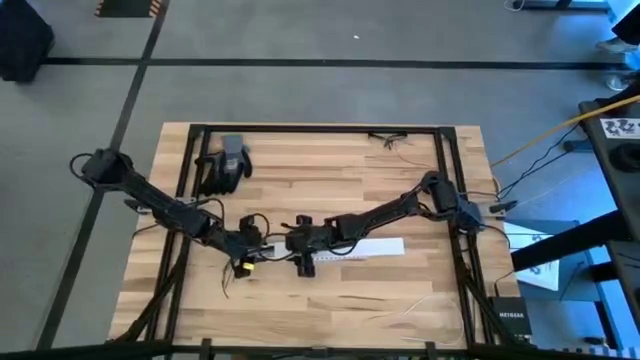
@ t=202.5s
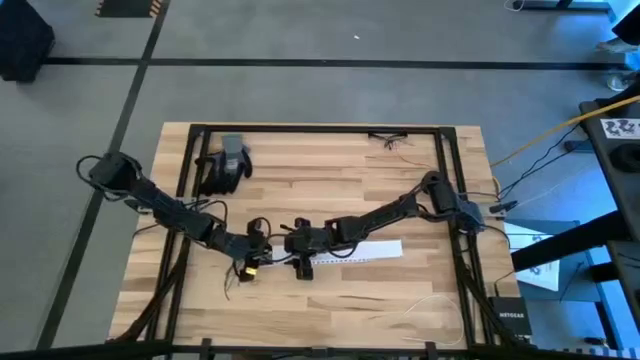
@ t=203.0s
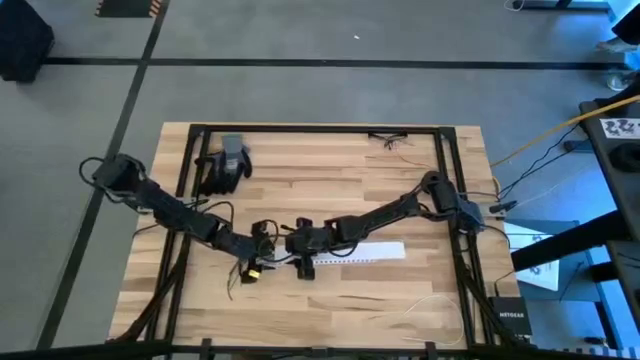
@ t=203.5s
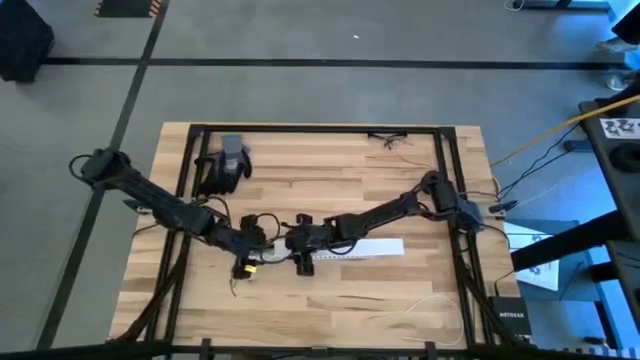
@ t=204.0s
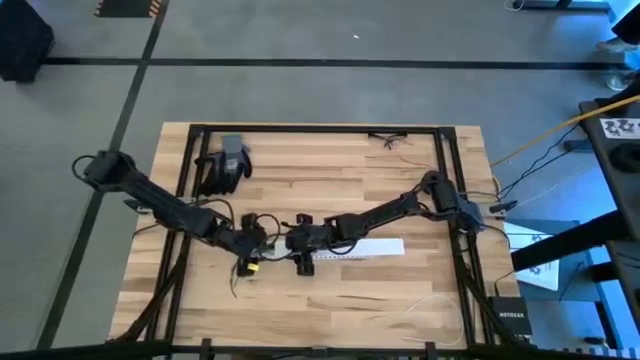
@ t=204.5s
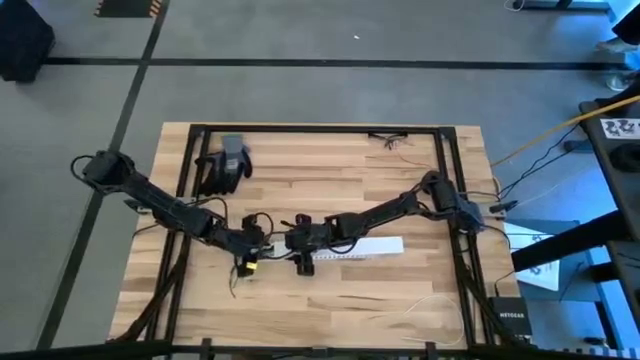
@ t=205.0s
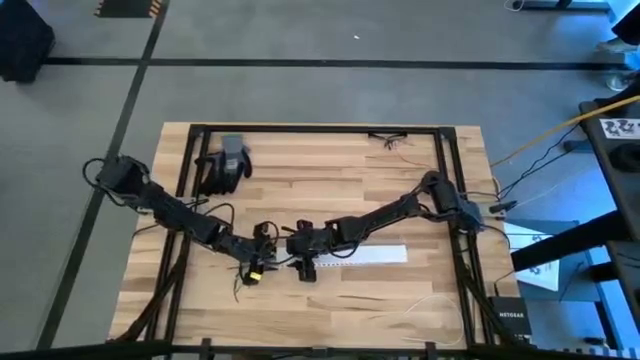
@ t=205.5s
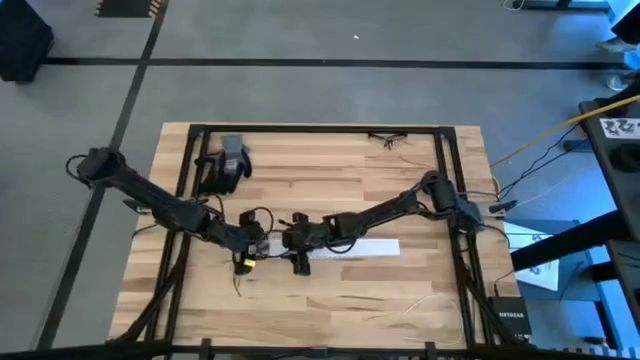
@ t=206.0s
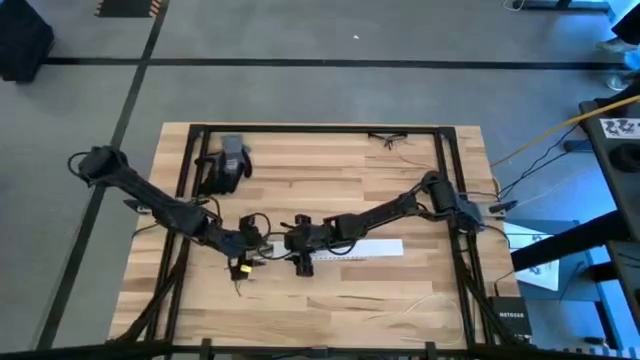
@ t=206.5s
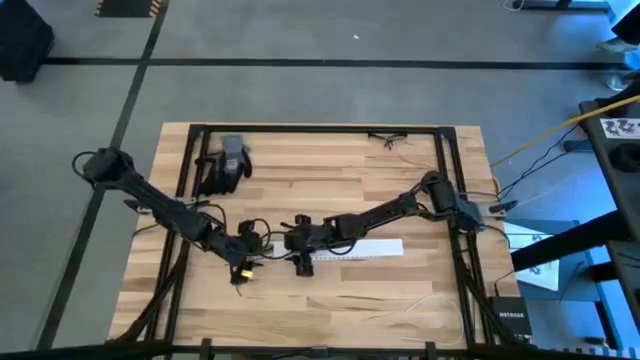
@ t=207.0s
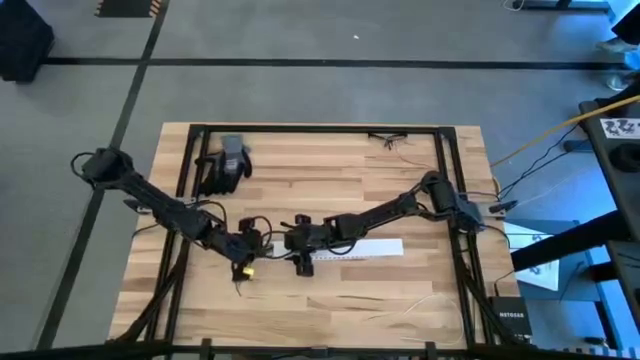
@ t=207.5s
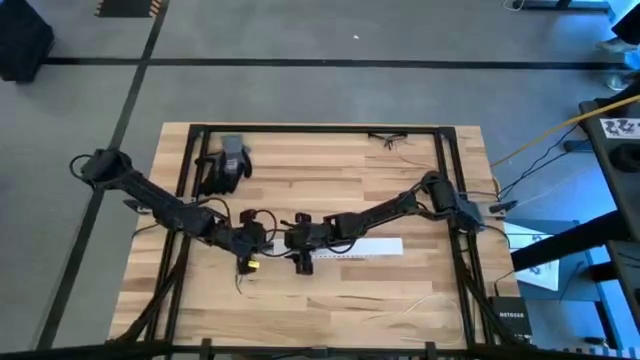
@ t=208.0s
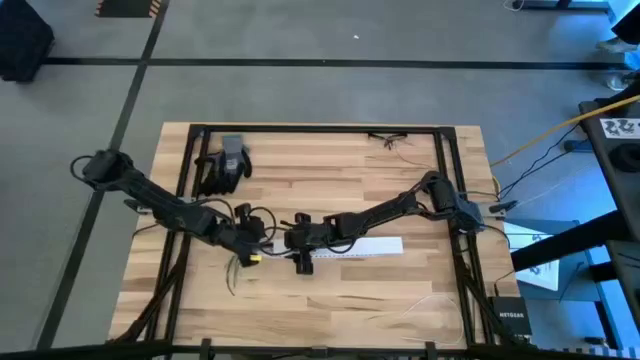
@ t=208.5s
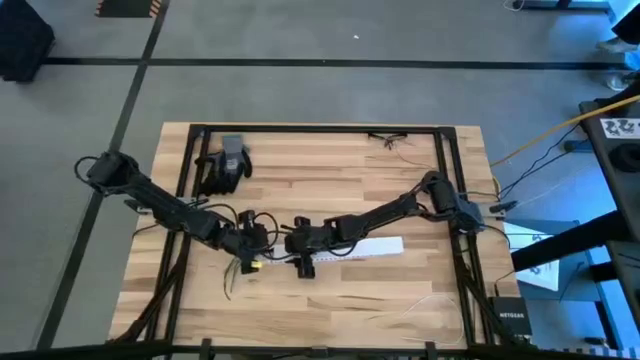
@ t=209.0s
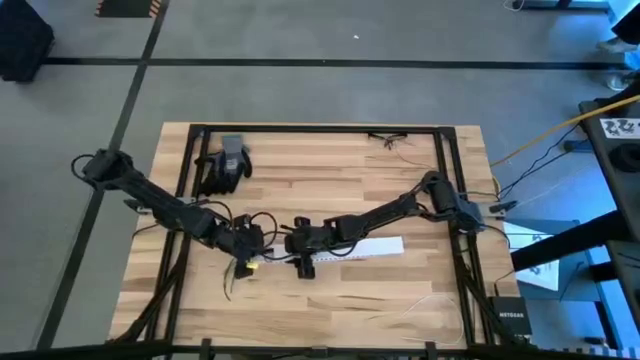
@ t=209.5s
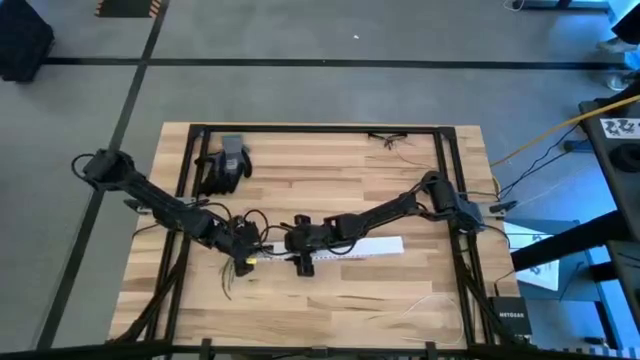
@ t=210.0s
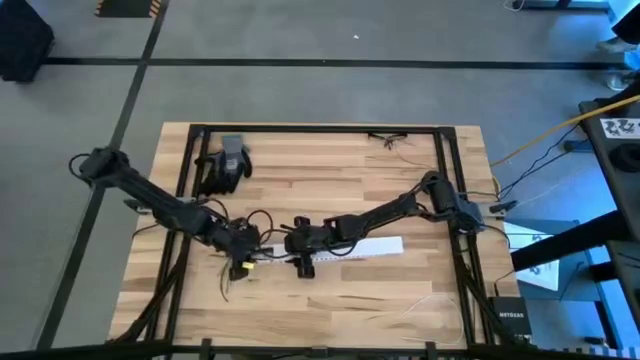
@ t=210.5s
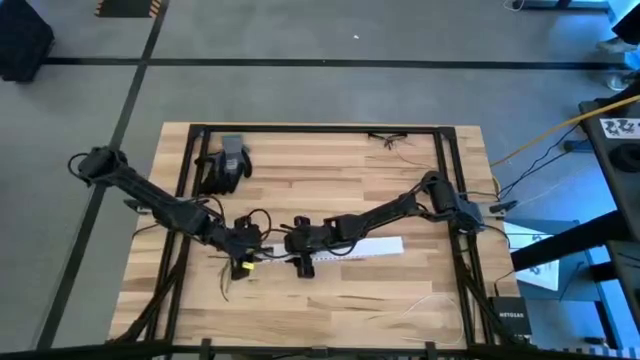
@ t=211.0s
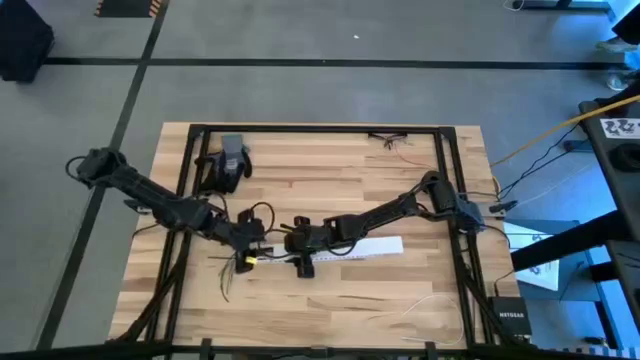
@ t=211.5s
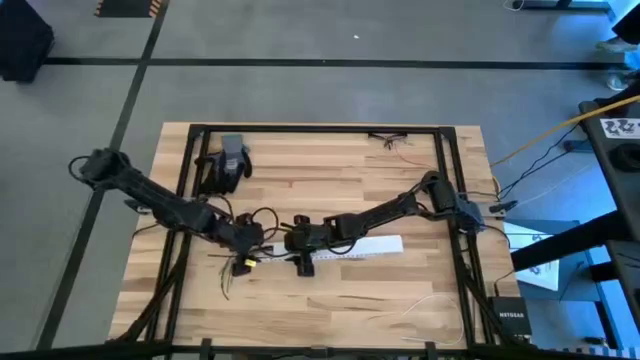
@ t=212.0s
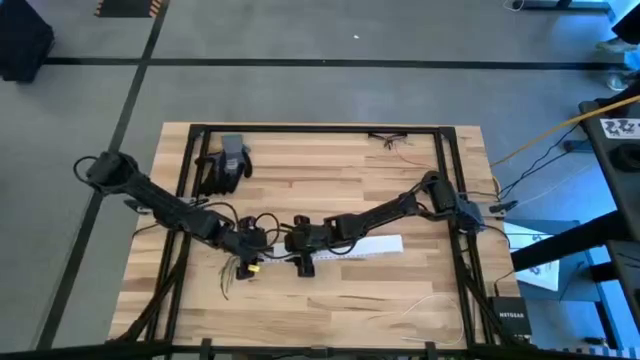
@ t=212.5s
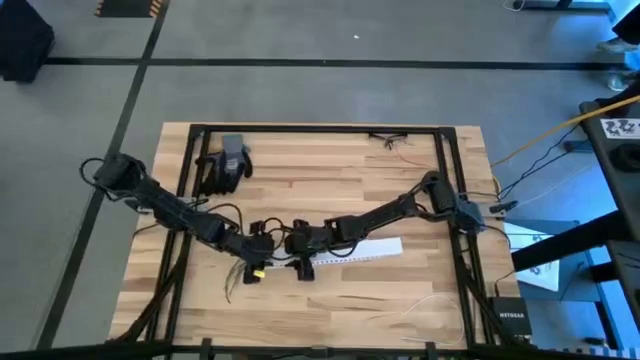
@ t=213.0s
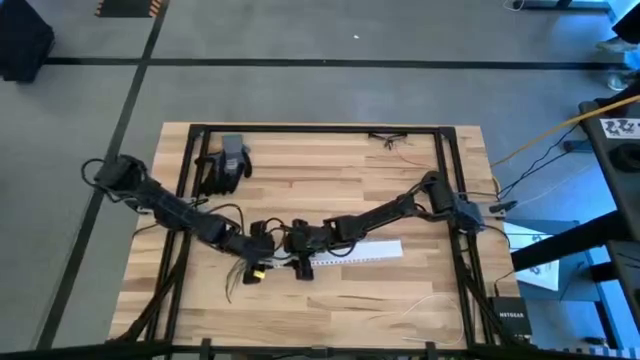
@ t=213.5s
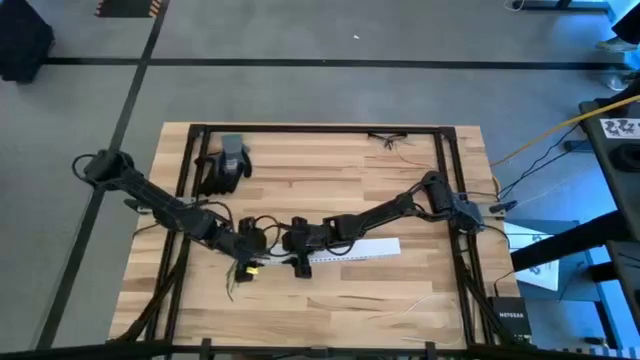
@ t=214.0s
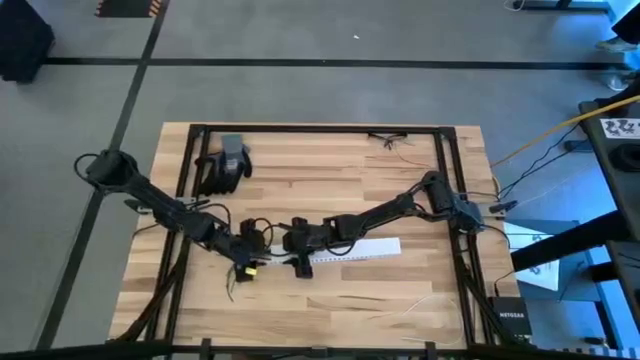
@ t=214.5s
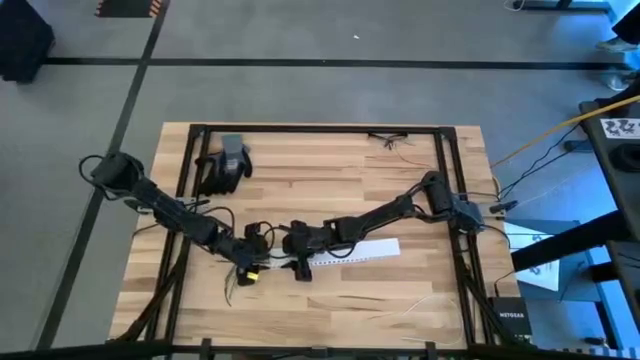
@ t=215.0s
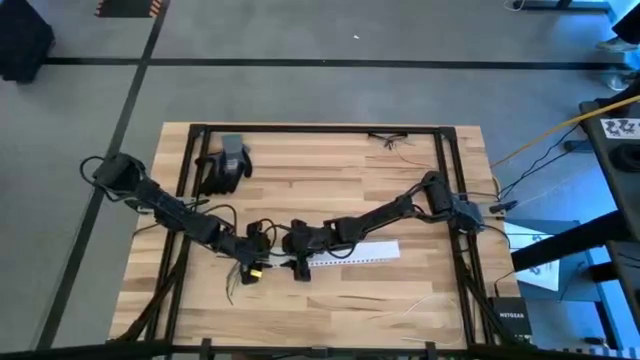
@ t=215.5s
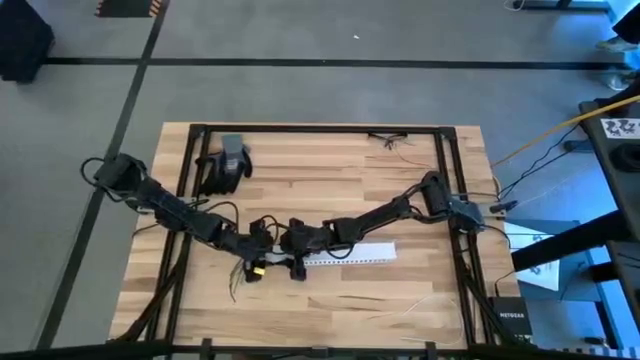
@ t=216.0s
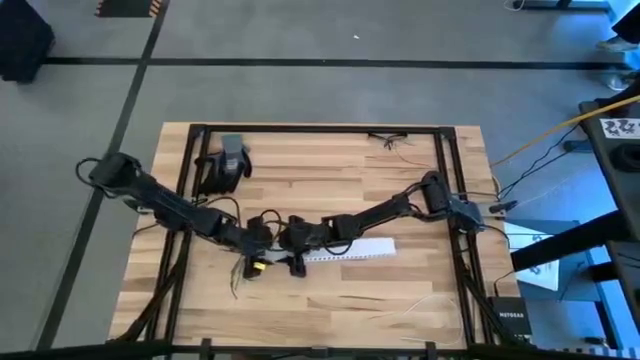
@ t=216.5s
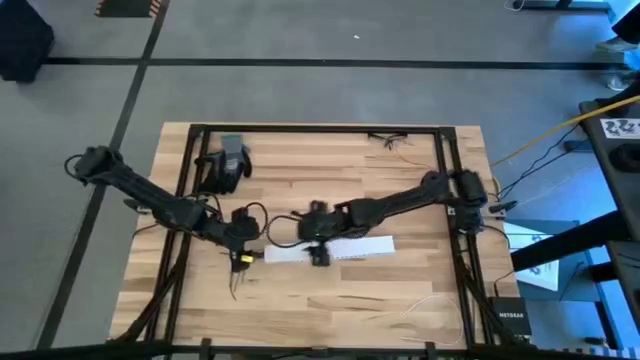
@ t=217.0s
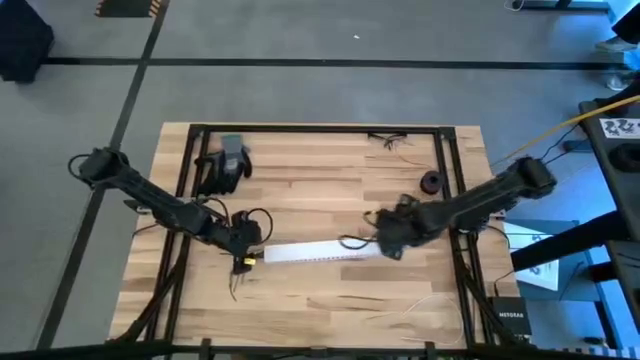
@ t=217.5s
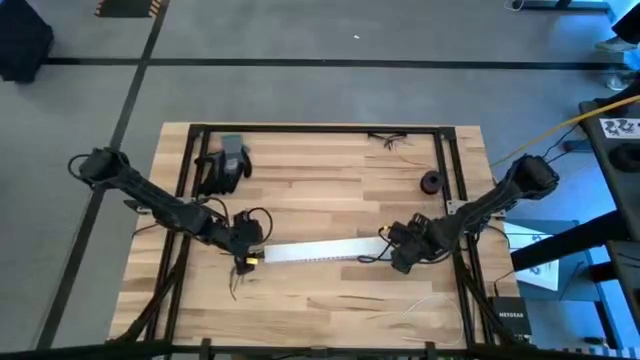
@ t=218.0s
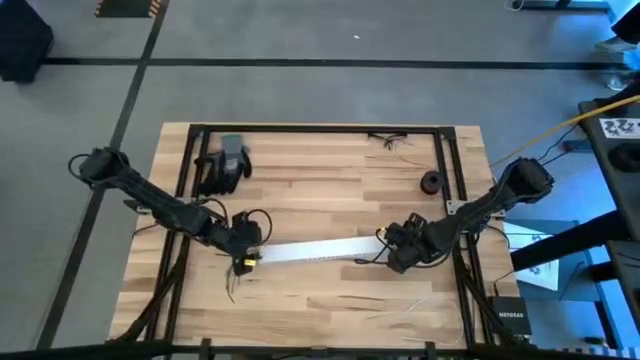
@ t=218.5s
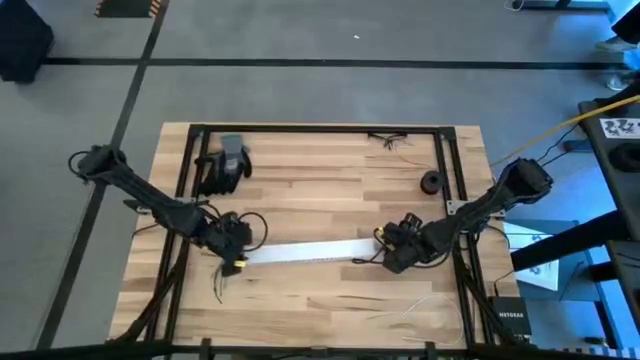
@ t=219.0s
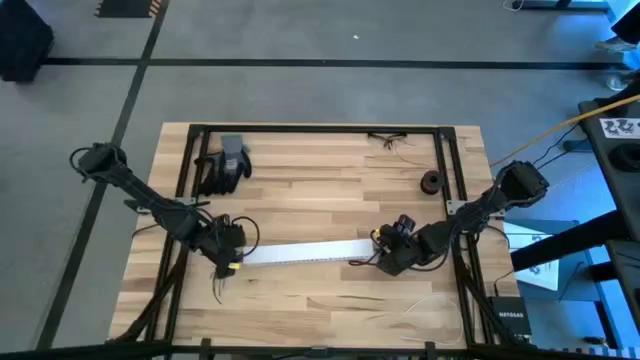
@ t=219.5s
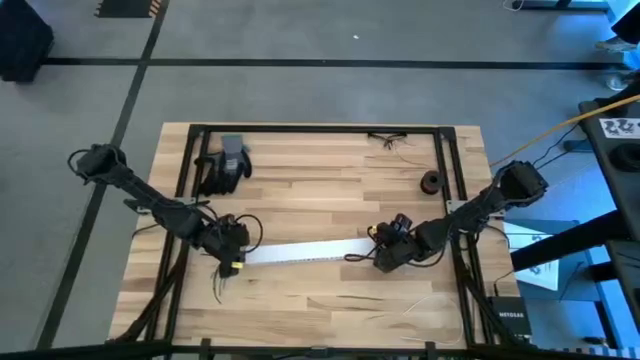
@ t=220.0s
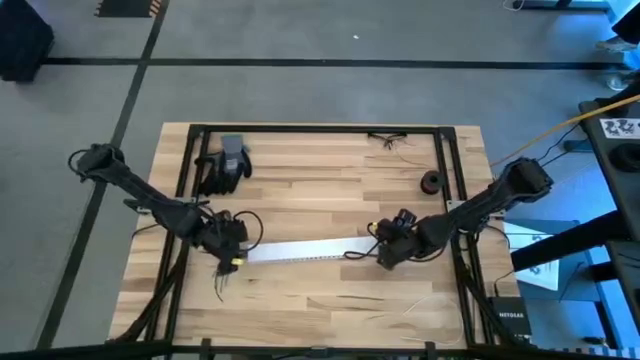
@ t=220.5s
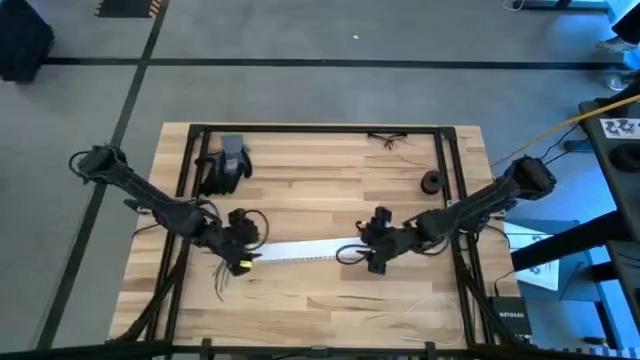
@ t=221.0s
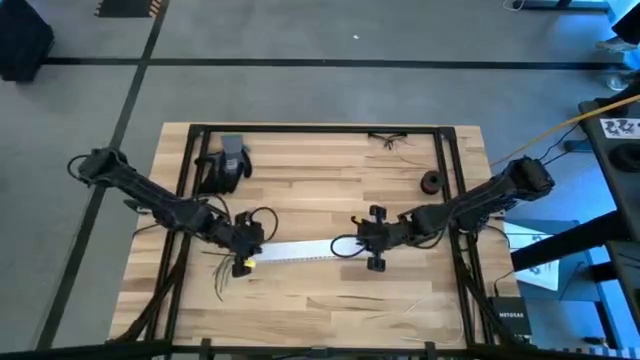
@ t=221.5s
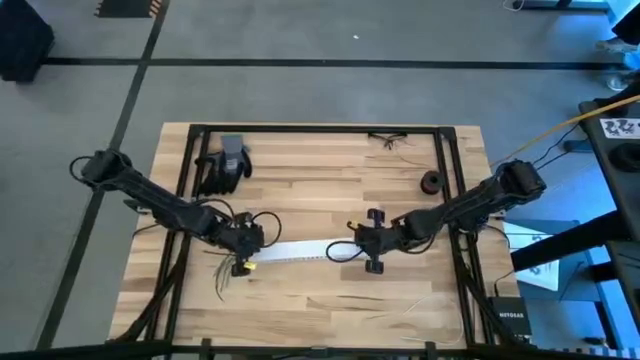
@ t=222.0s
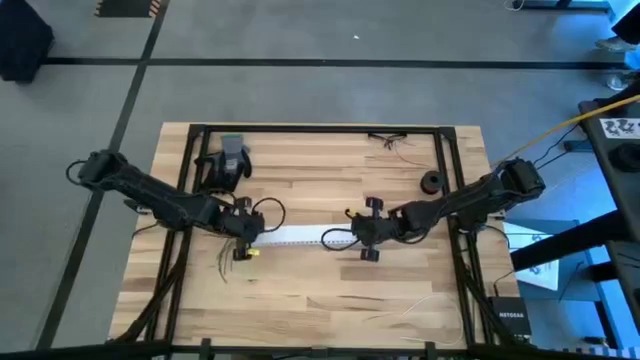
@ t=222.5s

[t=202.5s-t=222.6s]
Task: Ziptie cables
Close the cable duct

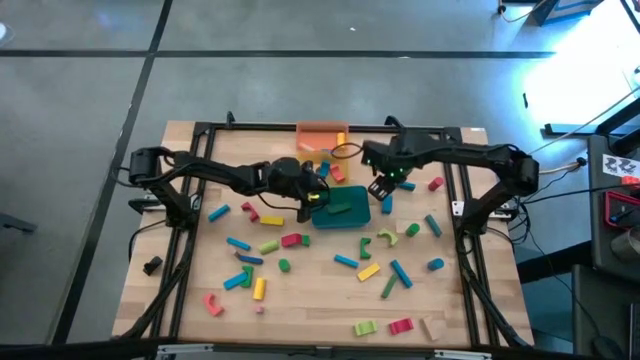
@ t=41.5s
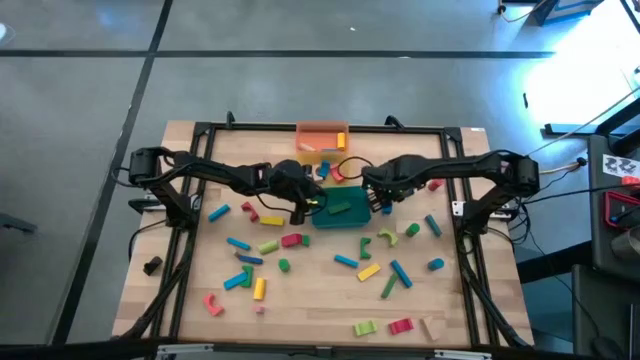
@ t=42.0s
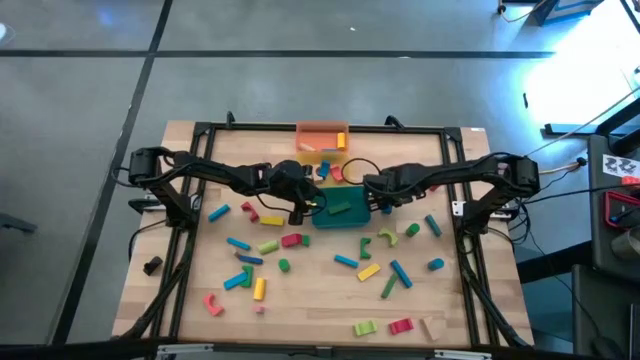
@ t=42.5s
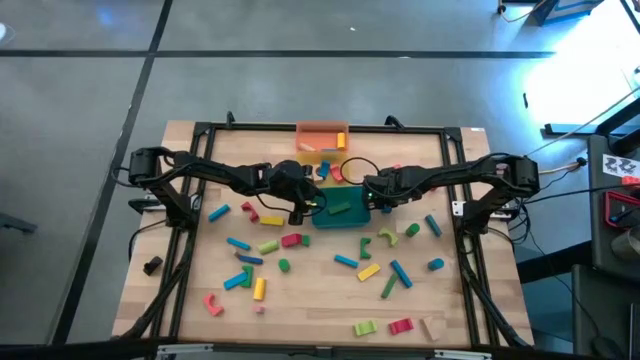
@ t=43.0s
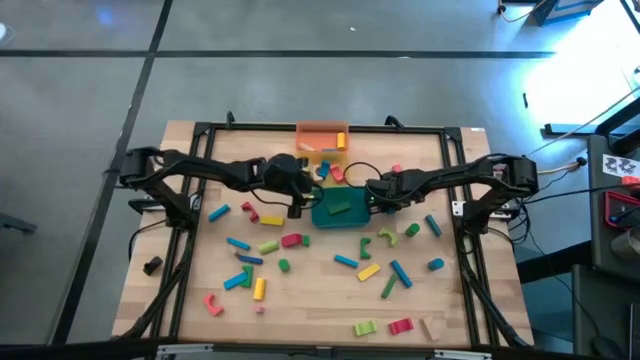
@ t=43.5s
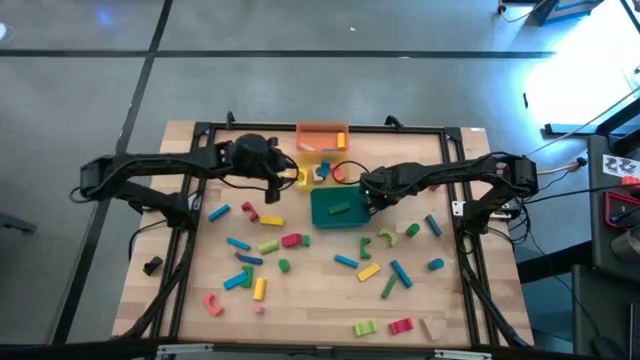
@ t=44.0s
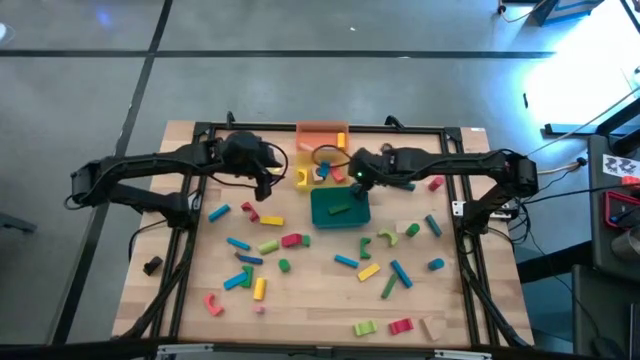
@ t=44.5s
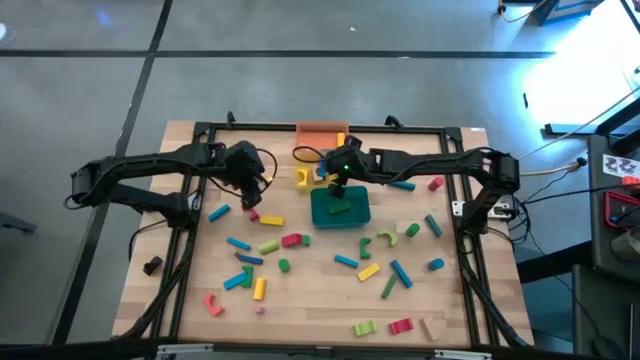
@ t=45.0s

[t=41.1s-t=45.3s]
Task: Sort blocks by size
Put the blue arch block into the yellow bin
